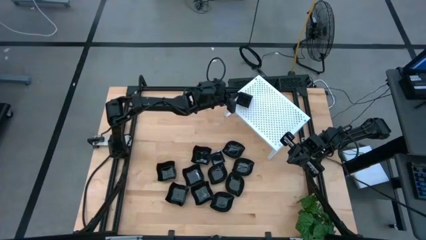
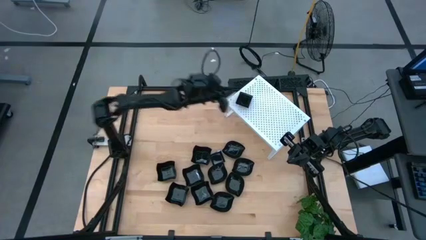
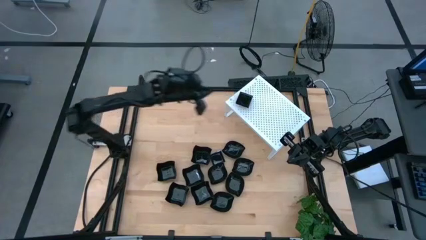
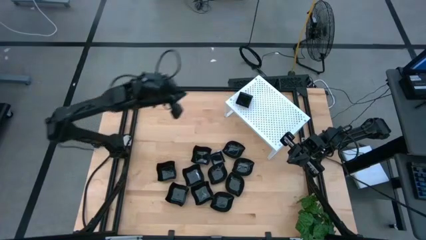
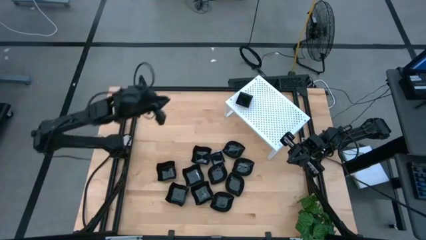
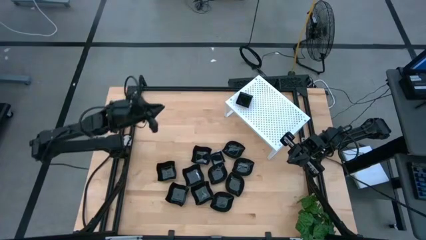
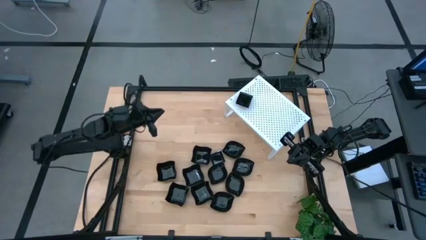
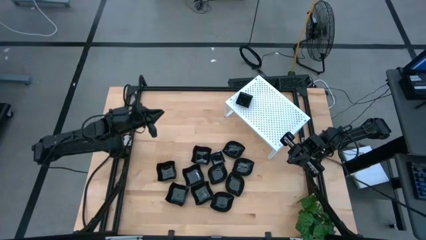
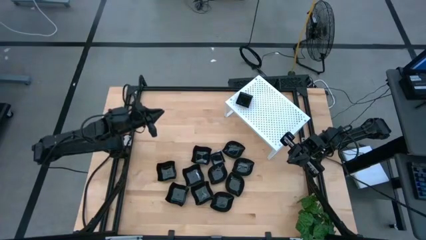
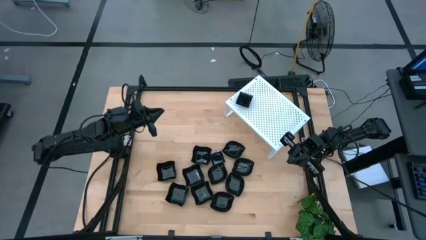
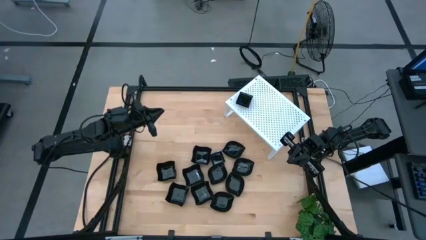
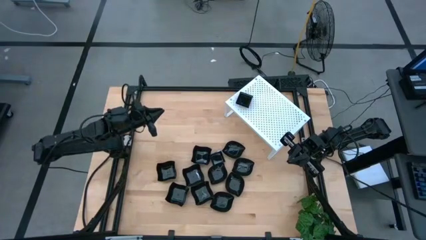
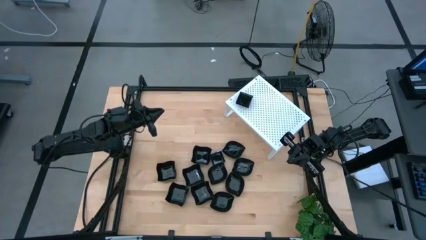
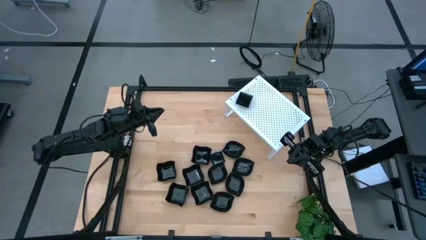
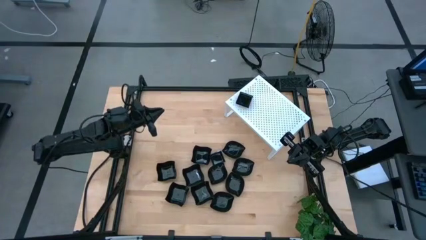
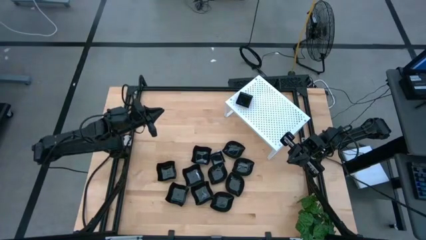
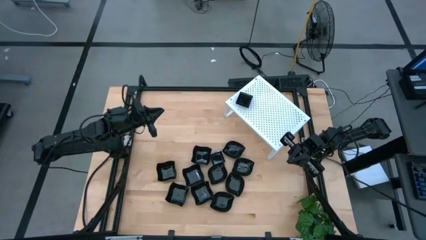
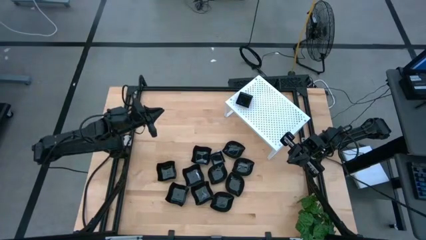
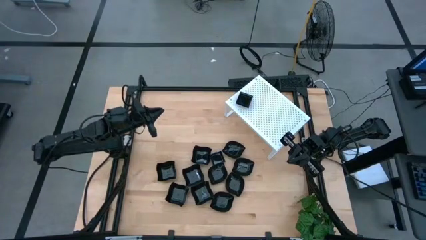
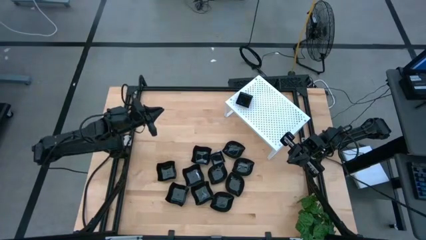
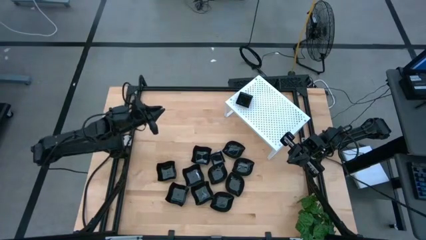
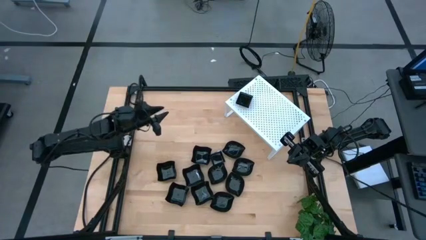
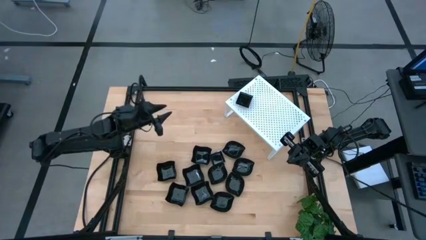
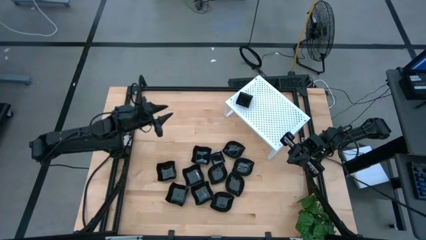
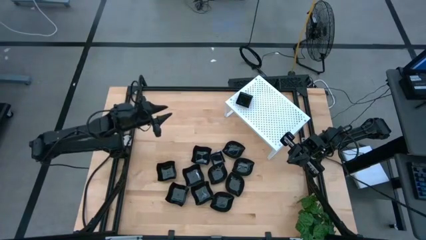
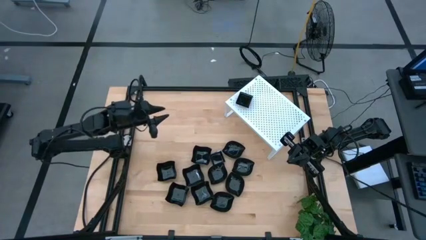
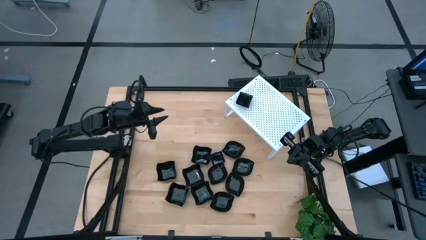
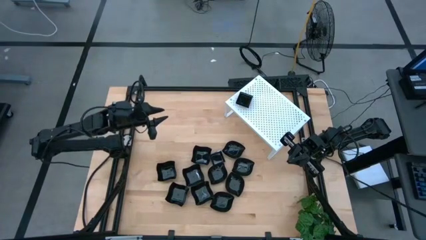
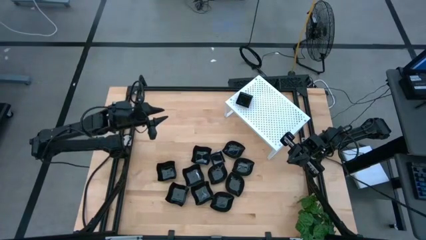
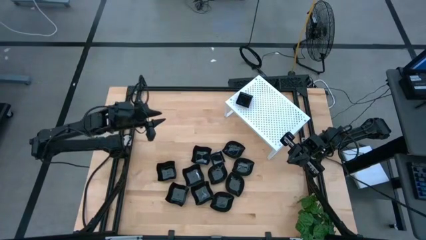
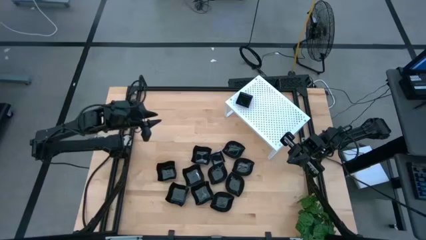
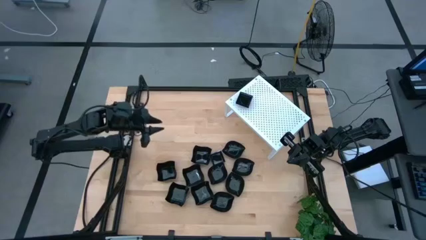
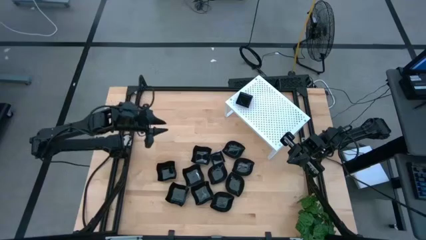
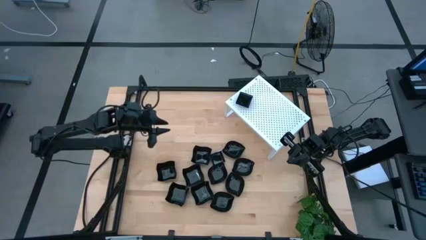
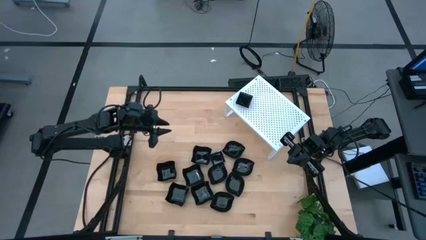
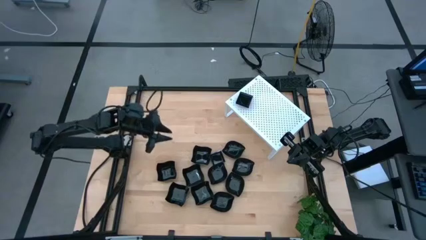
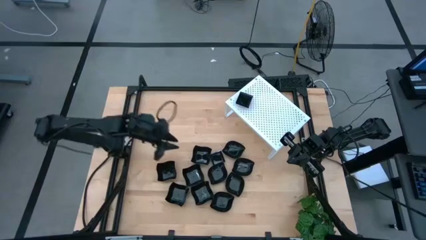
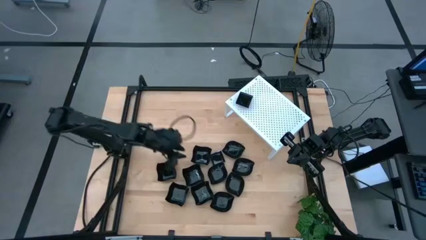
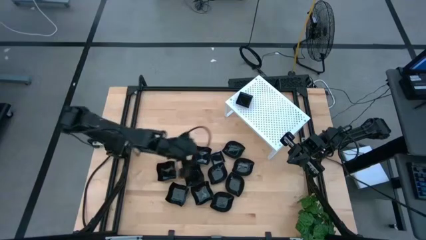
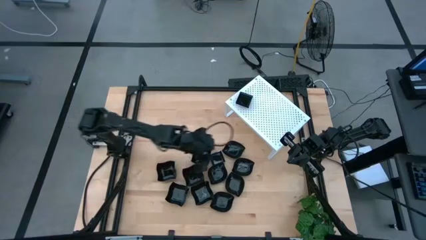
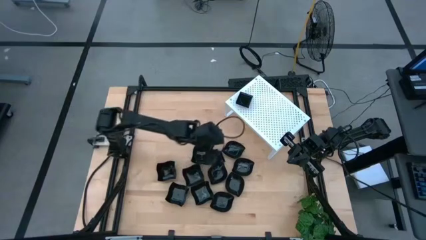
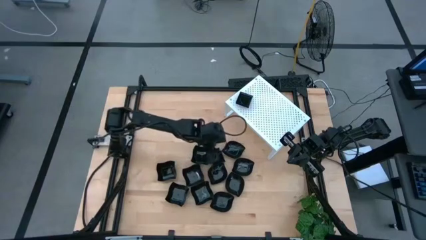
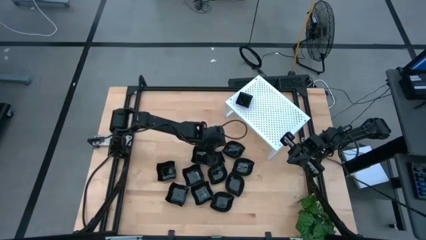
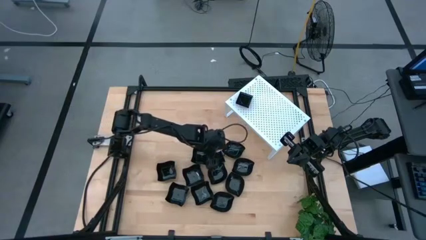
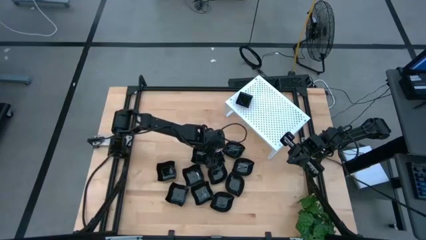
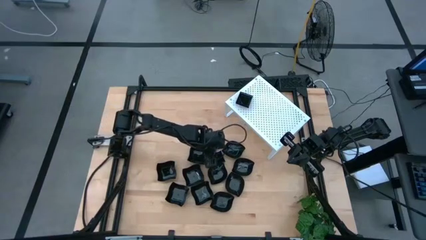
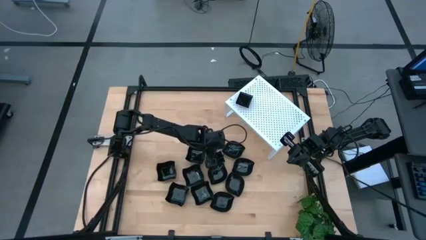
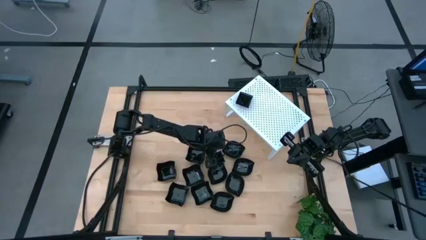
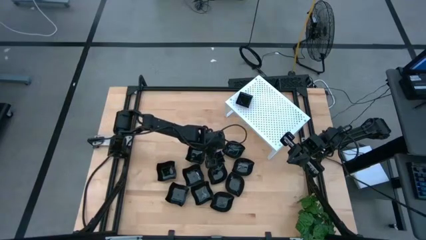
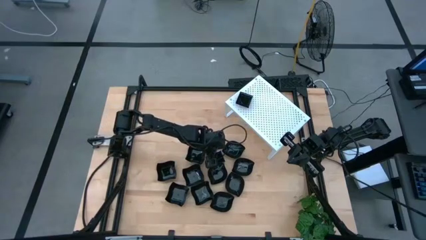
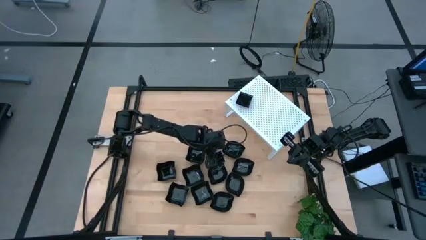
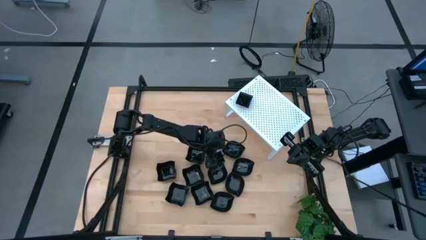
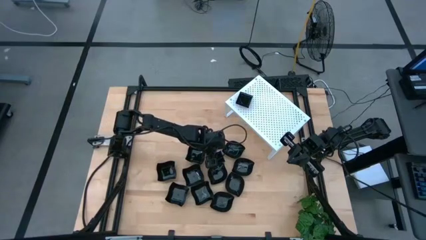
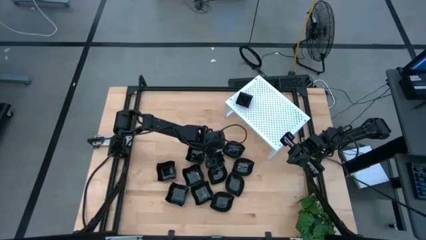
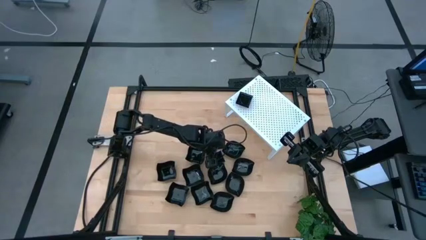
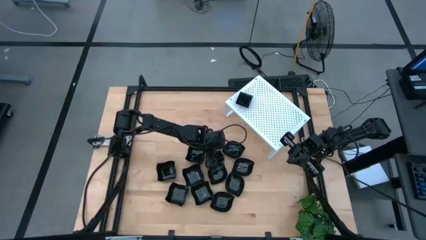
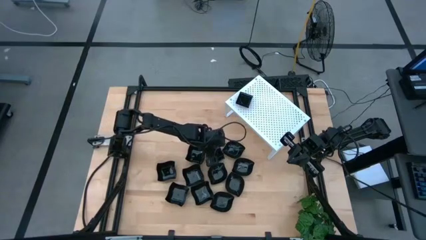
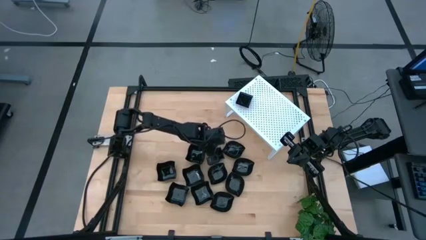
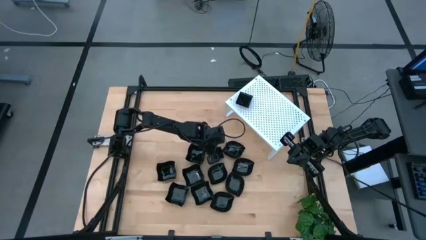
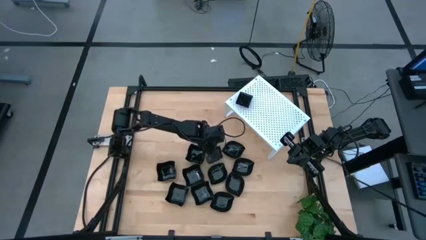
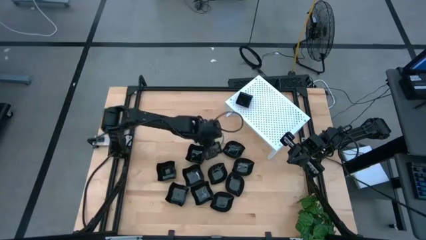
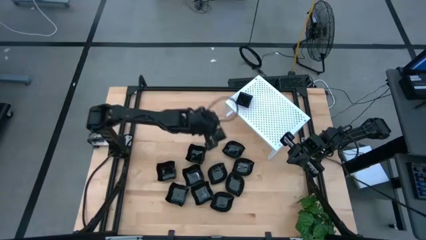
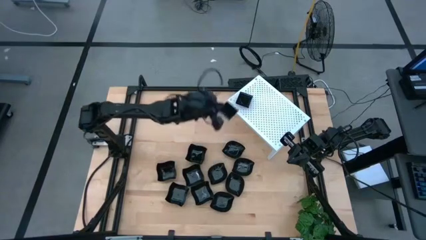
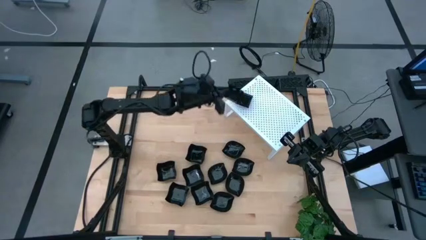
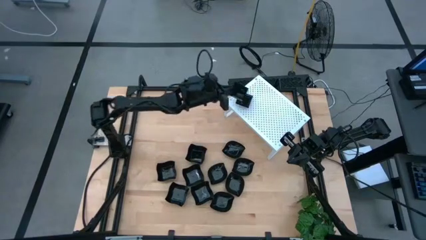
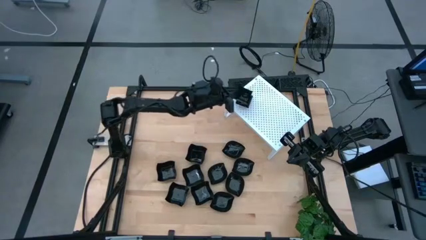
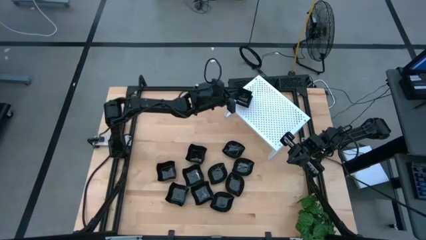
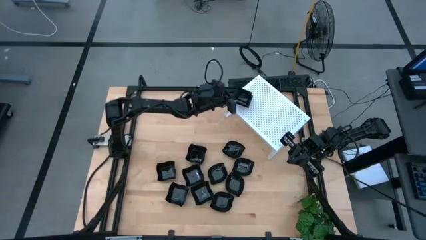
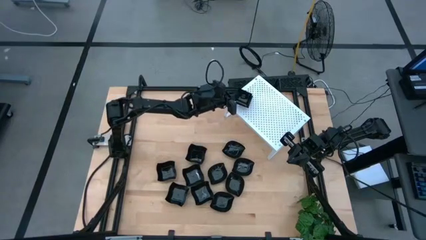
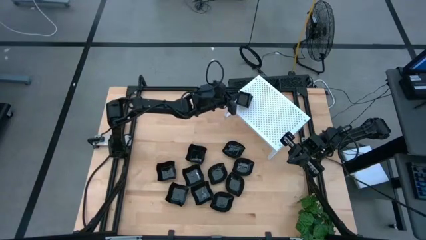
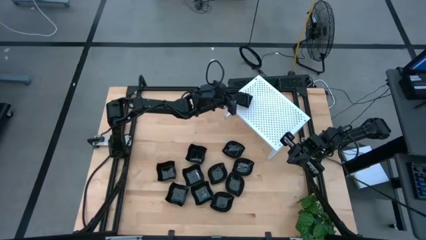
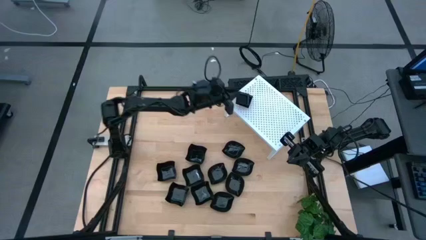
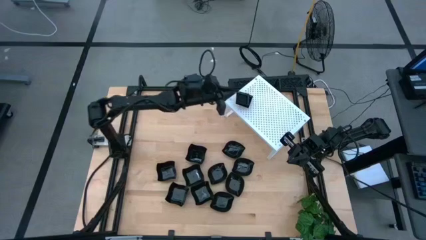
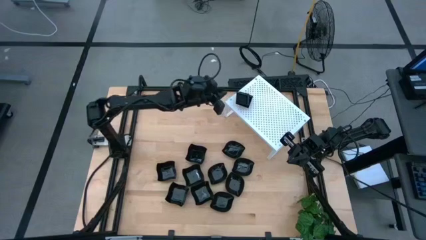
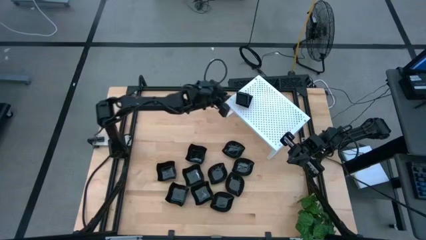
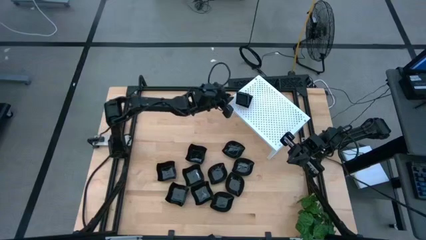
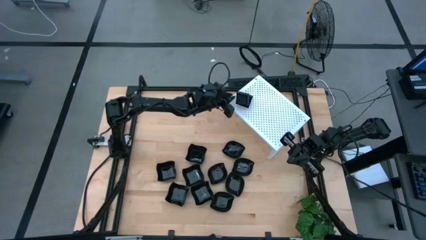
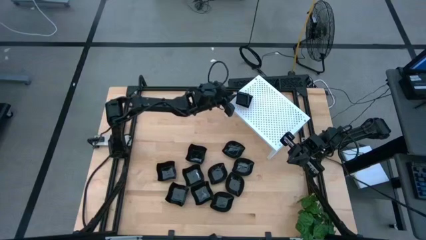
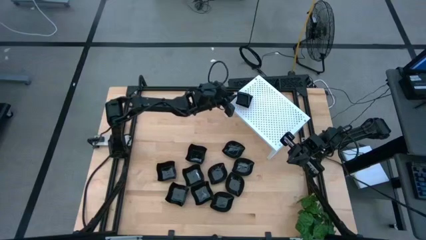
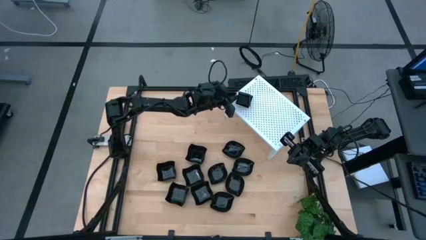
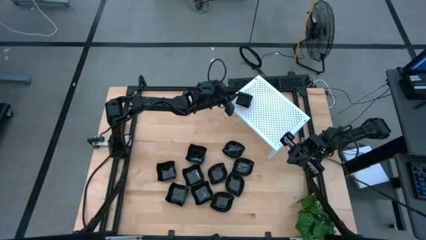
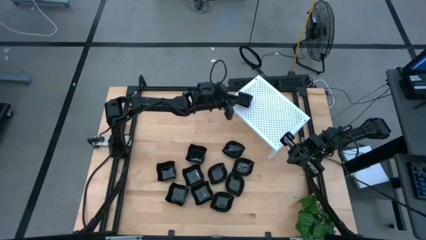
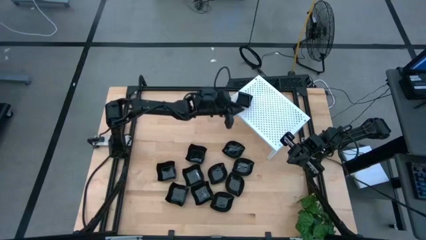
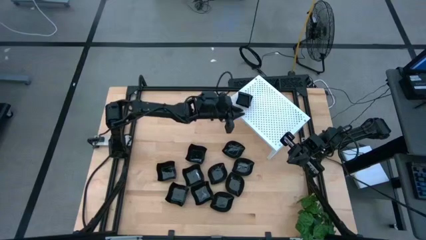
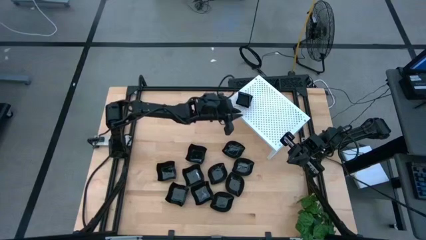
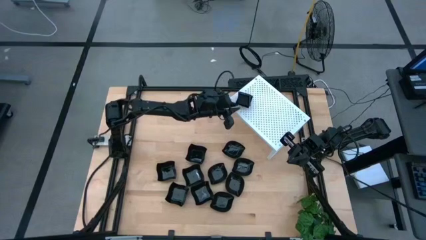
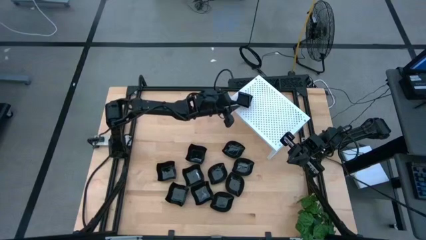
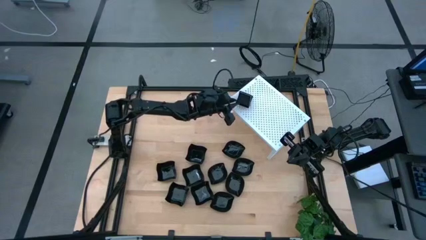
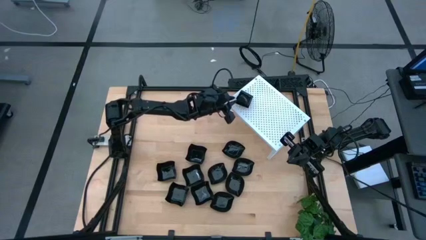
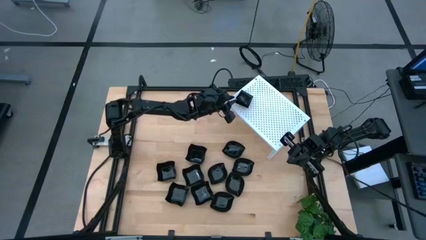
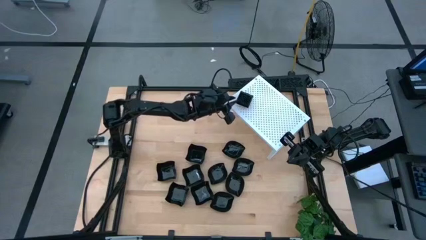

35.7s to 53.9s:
Task: Pick & Place Mini shaped plates
Stack the black square plate on top of the other black square plates on the shelf
